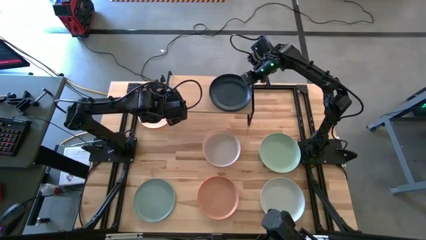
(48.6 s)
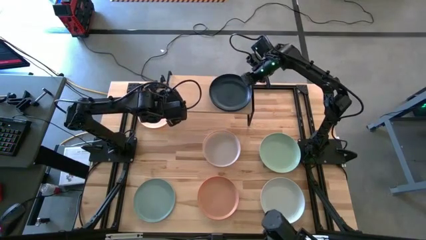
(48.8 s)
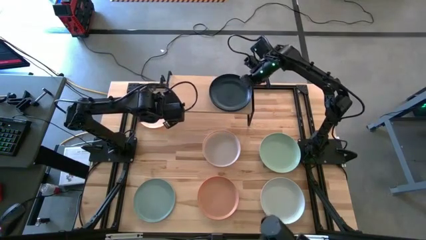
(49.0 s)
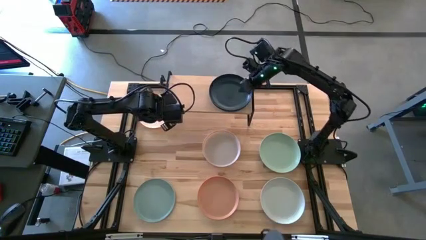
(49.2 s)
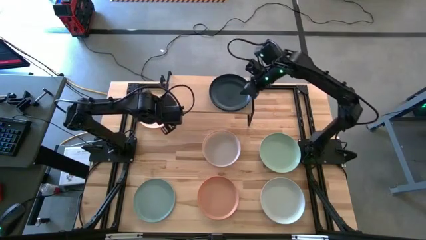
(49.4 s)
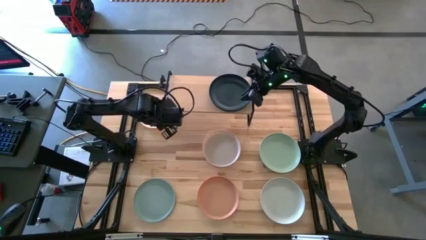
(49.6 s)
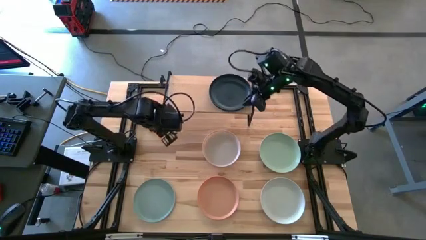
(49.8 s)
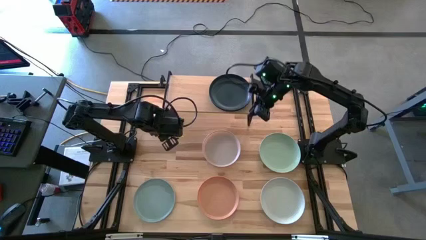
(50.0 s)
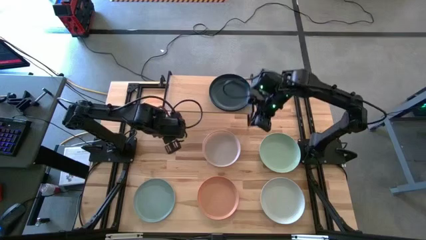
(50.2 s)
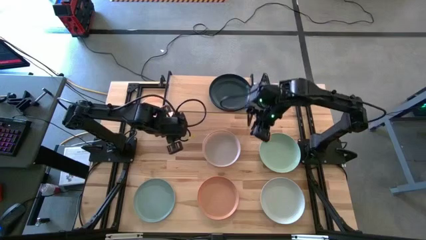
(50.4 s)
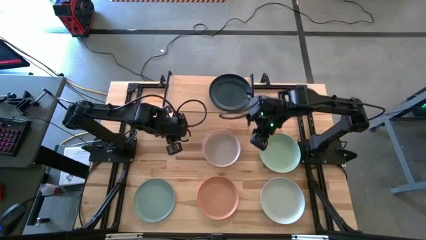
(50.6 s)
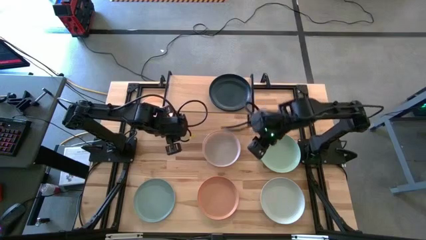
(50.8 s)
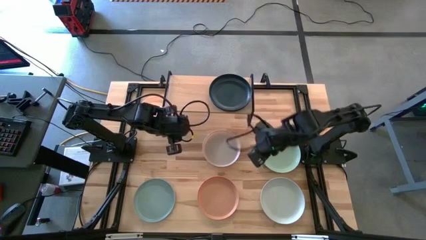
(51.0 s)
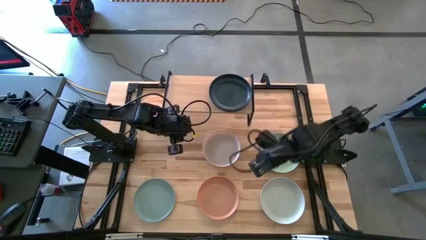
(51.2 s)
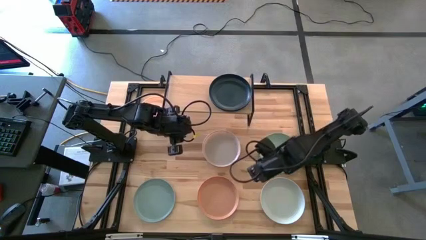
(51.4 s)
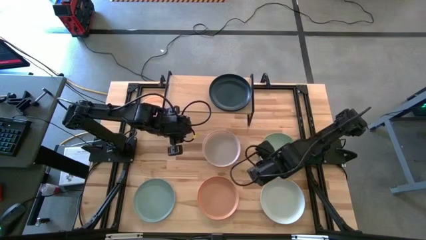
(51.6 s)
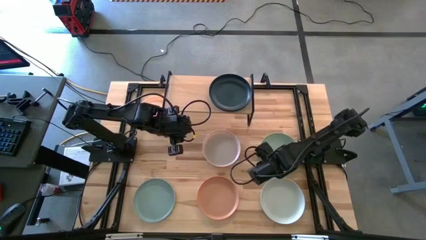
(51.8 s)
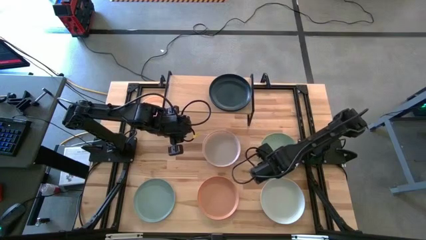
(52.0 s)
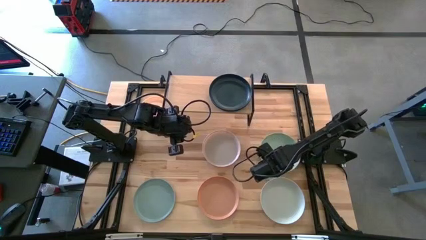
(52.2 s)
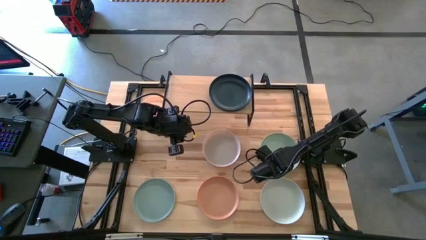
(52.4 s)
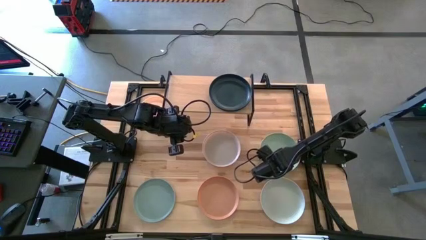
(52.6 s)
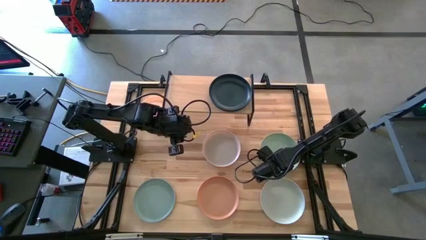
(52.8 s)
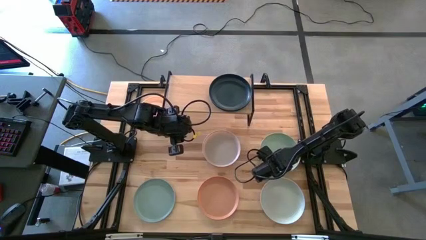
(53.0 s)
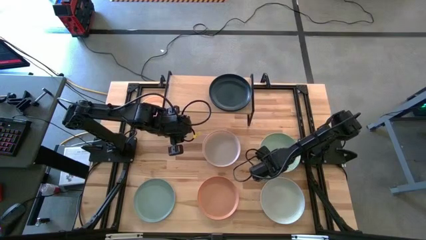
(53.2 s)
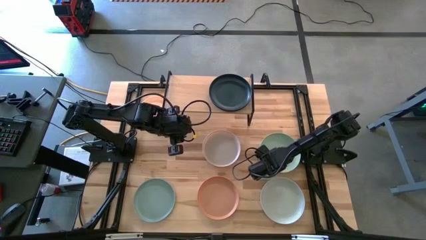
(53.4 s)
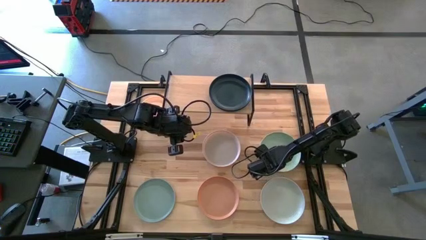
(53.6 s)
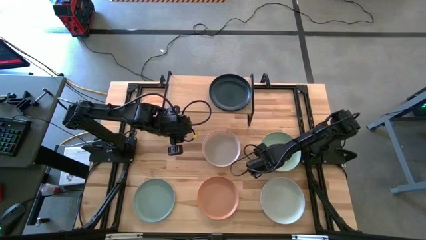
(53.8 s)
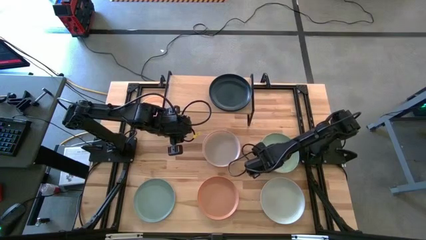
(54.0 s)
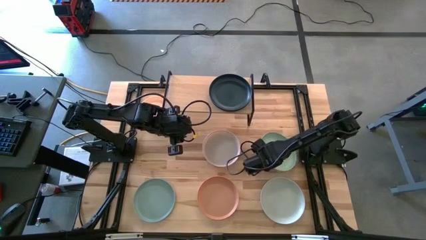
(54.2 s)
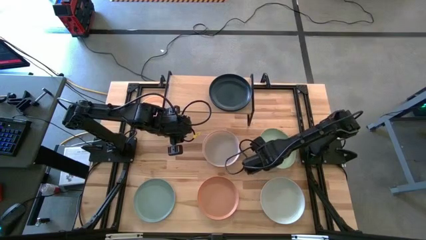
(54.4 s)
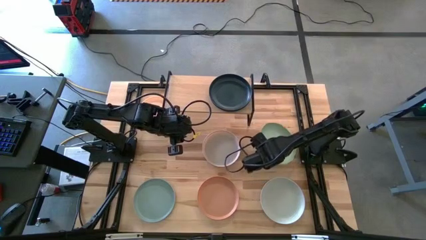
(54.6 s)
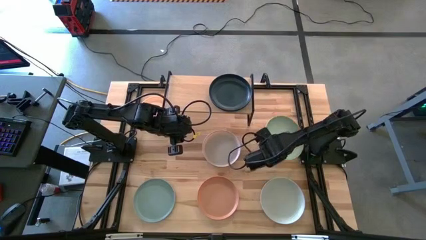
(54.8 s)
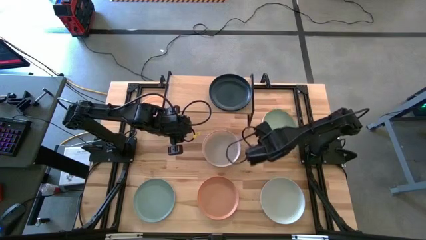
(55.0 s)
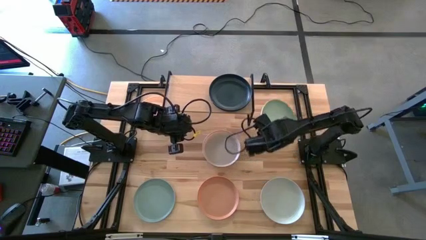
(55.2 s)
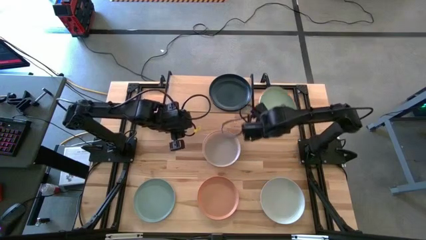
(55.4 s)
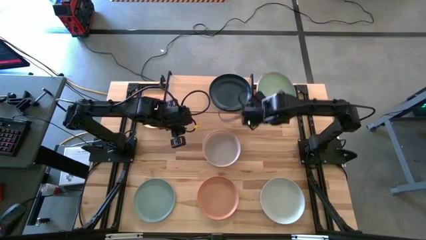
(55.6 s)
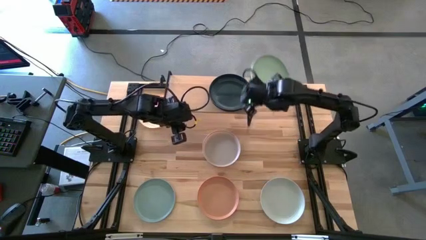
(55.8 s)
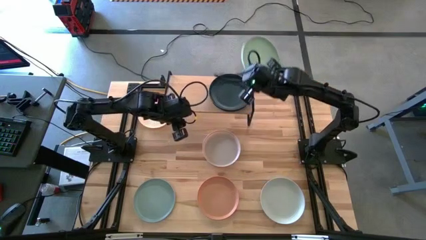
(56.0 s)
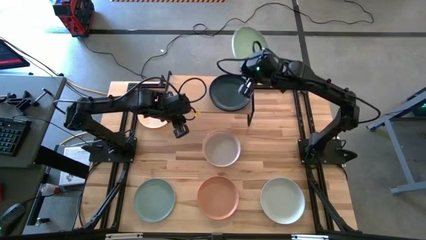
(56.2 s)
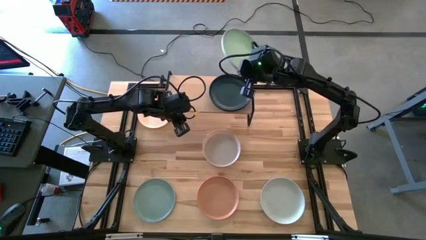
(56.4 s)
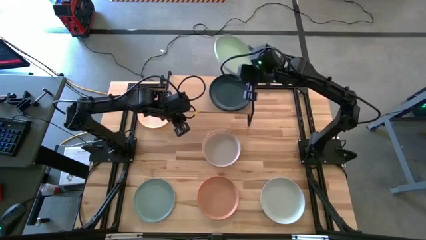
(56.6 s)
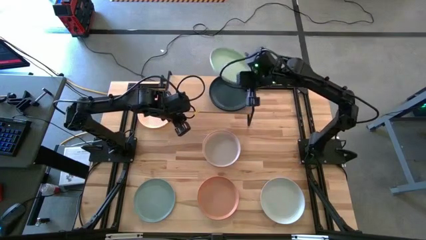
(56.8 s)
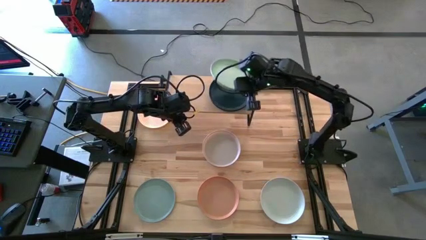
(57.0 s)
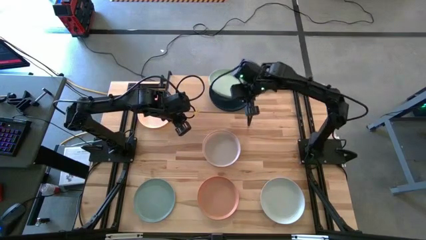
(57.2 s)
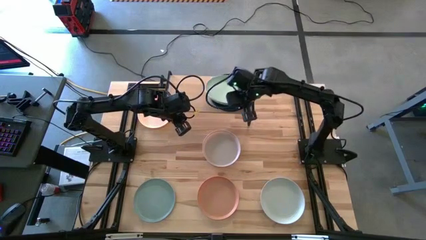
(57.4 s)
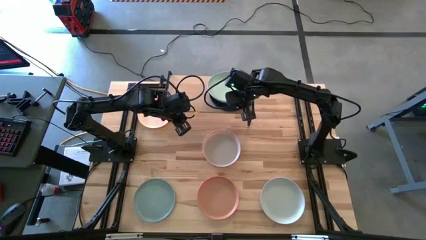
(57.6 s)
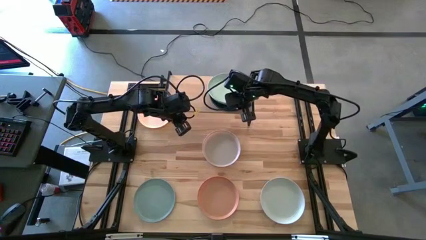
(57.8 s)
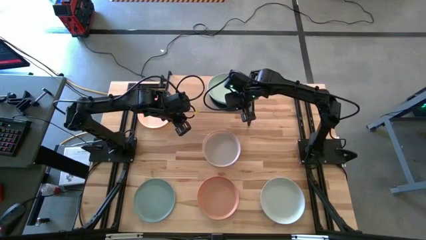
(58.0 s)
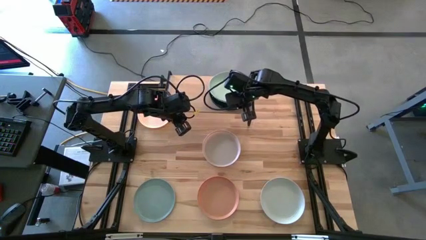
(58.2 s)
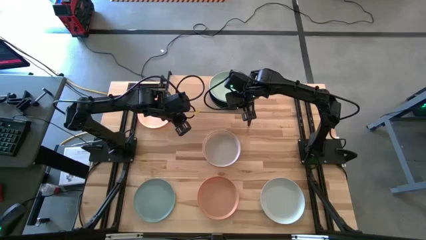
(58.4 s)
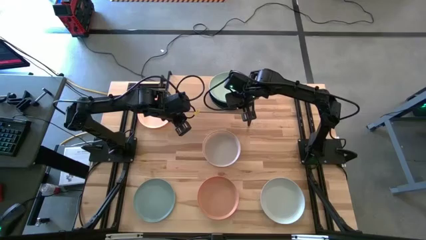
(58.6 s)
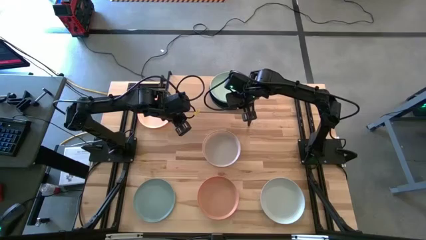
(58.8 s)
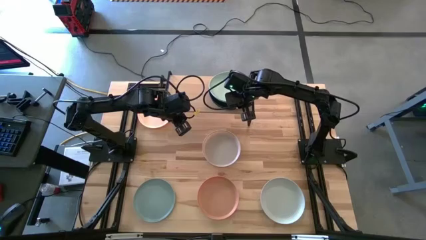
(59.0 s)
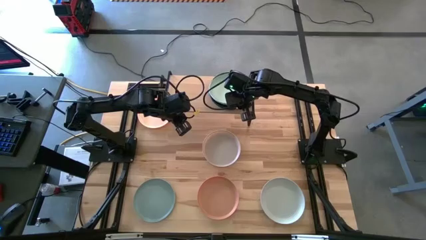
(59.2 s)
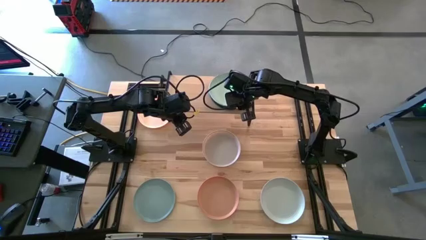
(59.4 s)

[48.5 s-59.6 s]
Task: Place and stack plates onto a shelf
Stack the green plate on top of the blue plate
